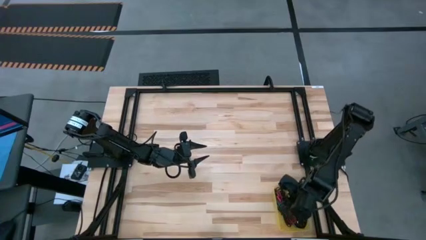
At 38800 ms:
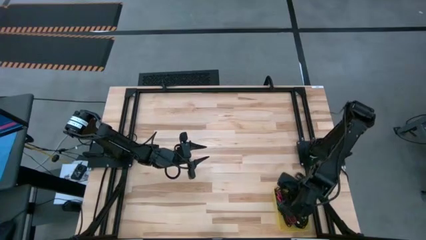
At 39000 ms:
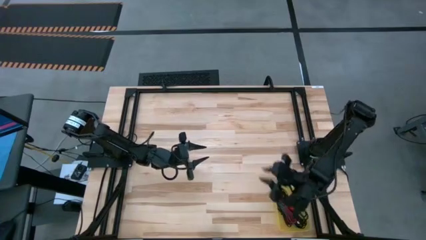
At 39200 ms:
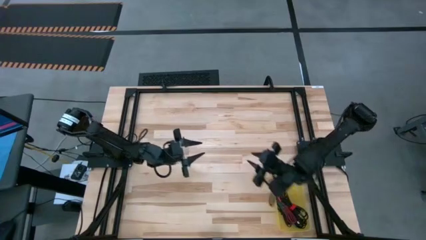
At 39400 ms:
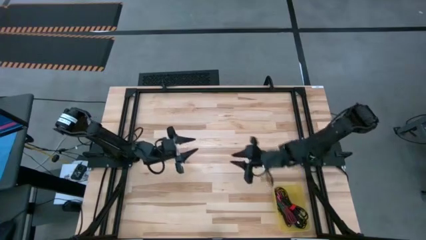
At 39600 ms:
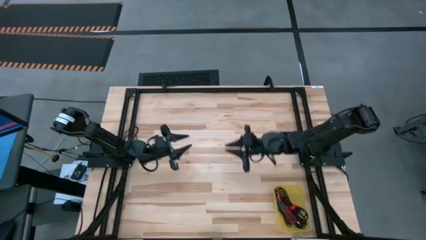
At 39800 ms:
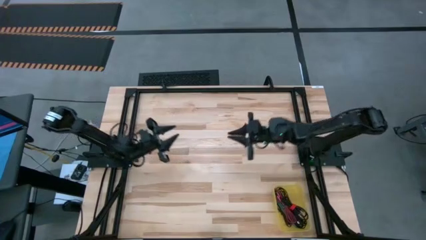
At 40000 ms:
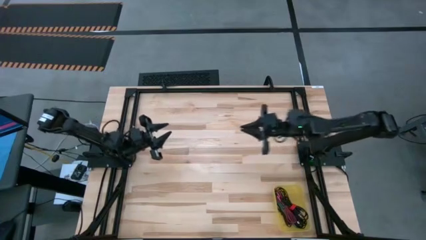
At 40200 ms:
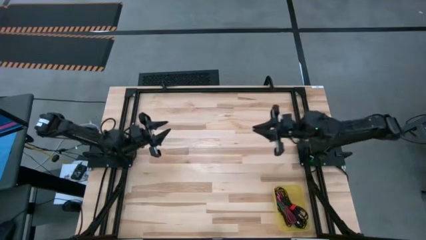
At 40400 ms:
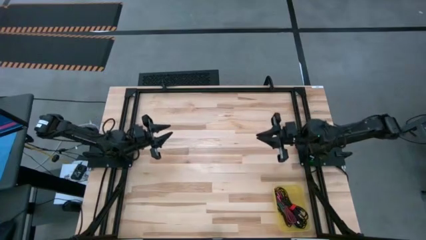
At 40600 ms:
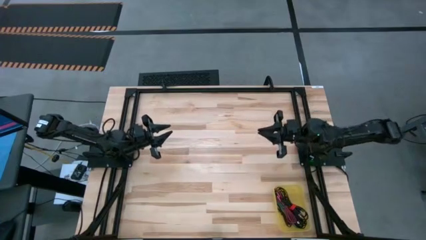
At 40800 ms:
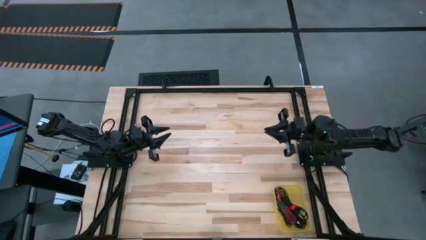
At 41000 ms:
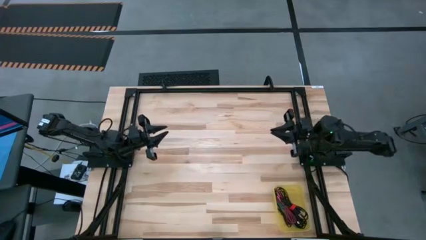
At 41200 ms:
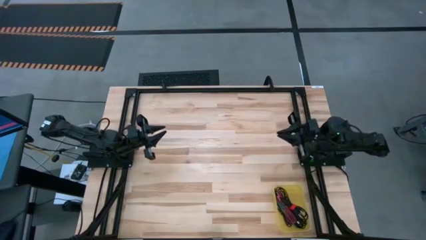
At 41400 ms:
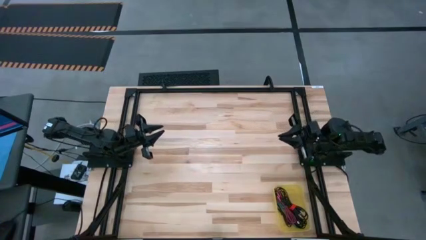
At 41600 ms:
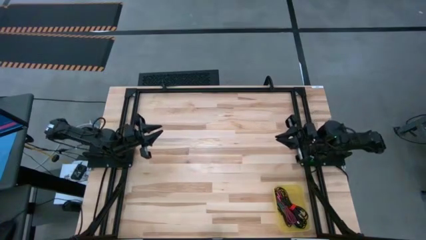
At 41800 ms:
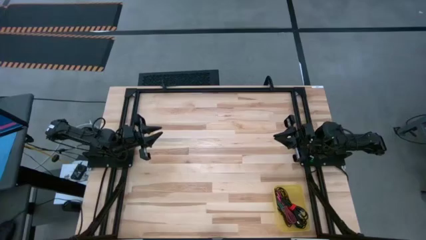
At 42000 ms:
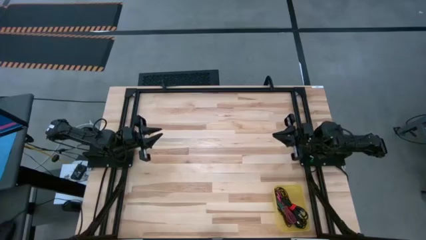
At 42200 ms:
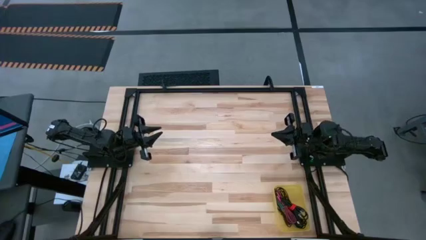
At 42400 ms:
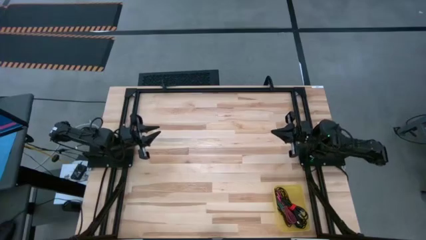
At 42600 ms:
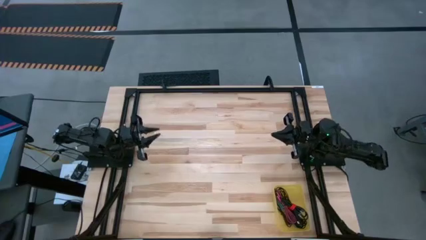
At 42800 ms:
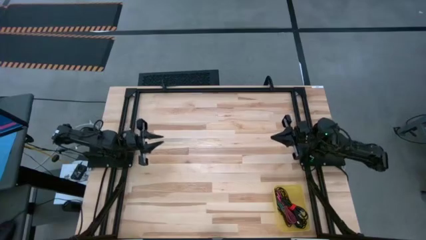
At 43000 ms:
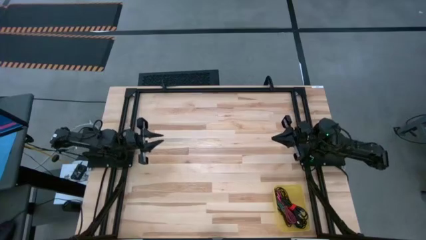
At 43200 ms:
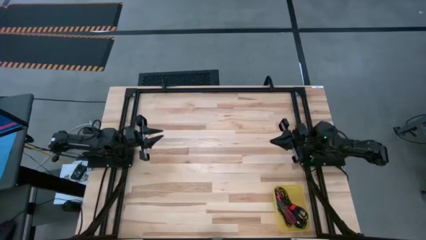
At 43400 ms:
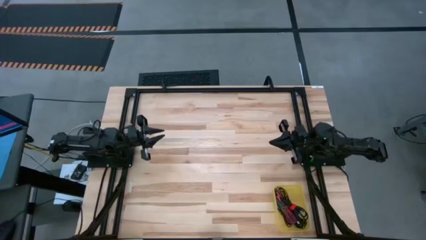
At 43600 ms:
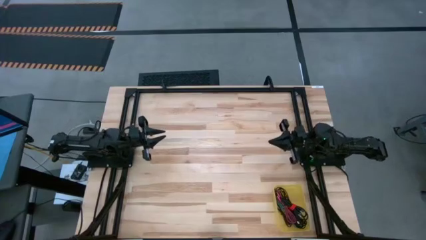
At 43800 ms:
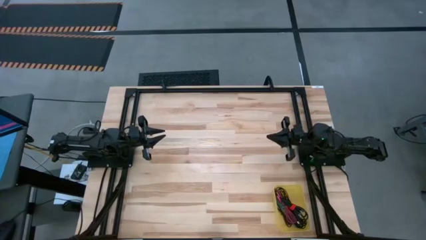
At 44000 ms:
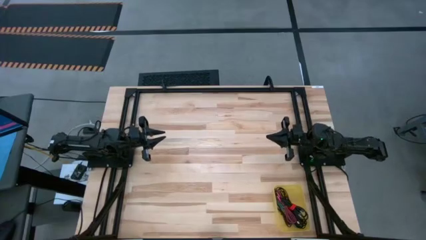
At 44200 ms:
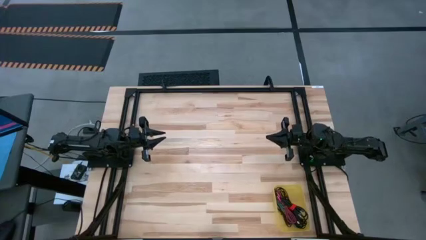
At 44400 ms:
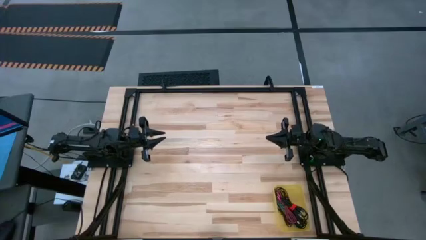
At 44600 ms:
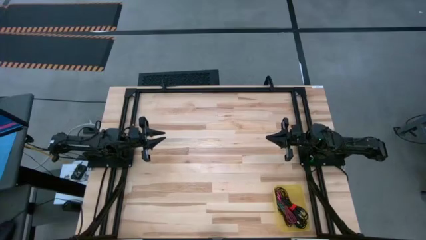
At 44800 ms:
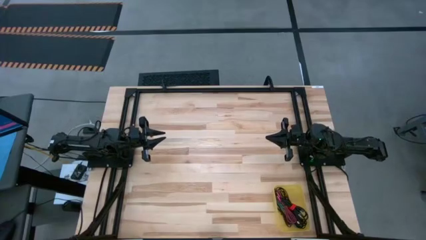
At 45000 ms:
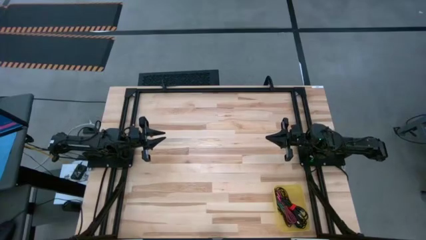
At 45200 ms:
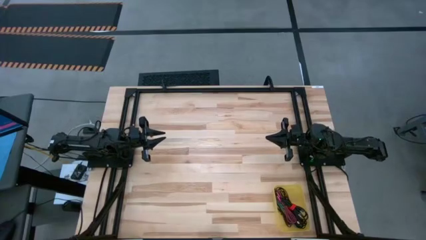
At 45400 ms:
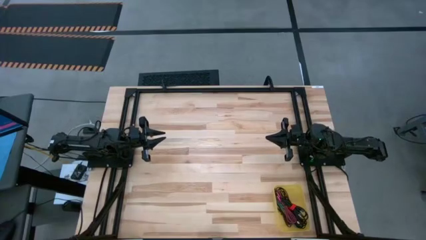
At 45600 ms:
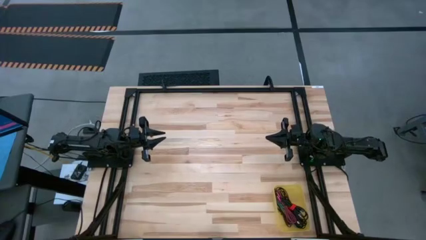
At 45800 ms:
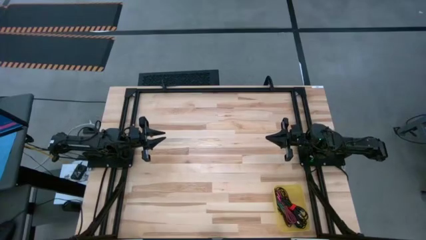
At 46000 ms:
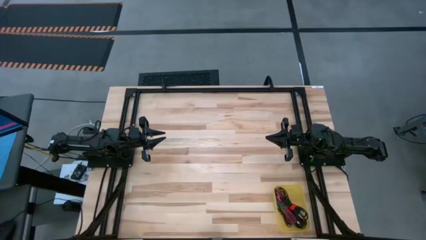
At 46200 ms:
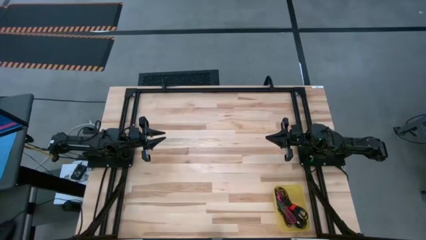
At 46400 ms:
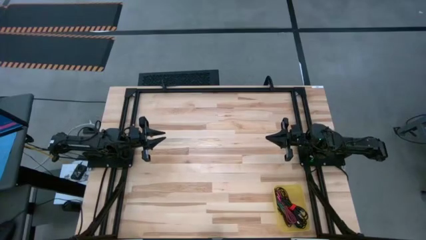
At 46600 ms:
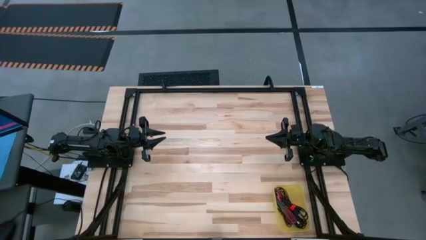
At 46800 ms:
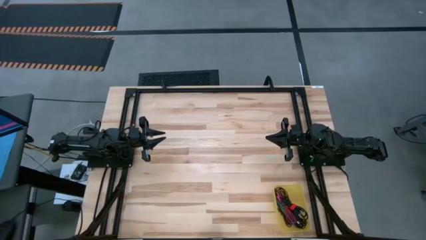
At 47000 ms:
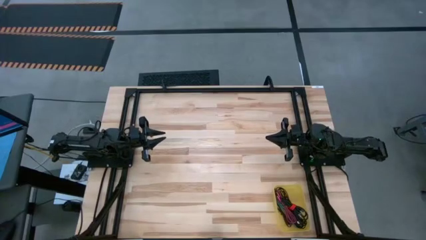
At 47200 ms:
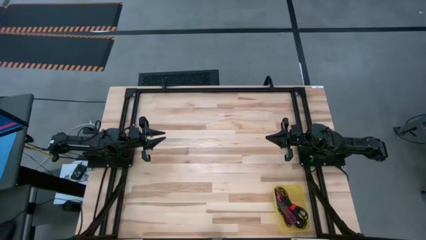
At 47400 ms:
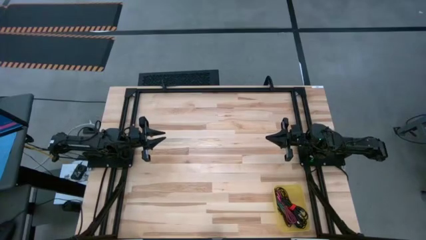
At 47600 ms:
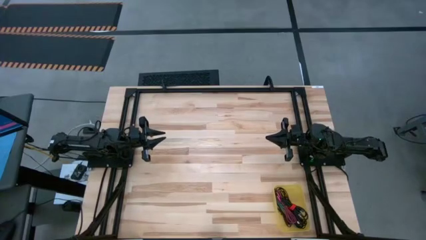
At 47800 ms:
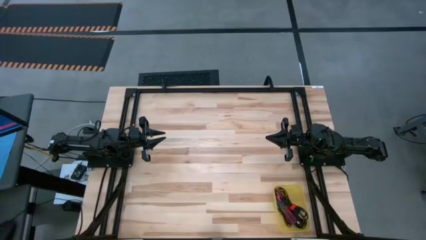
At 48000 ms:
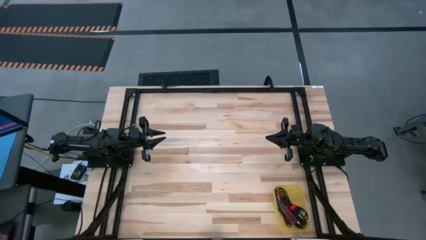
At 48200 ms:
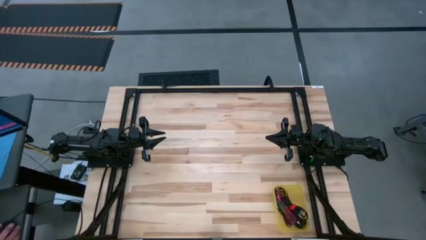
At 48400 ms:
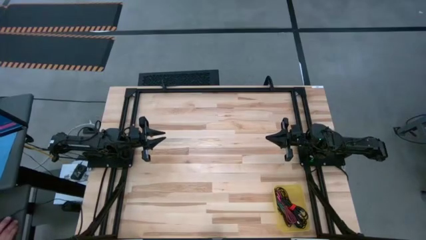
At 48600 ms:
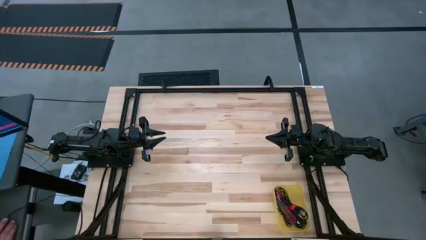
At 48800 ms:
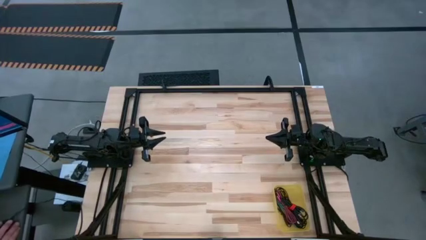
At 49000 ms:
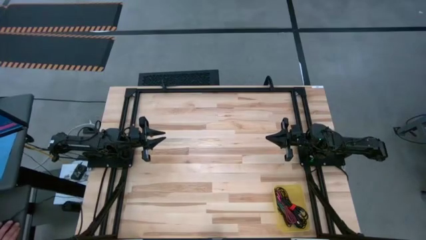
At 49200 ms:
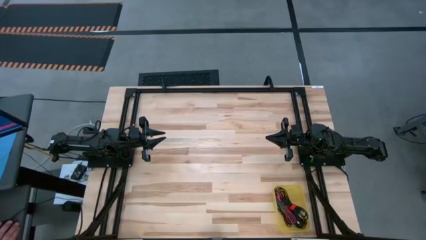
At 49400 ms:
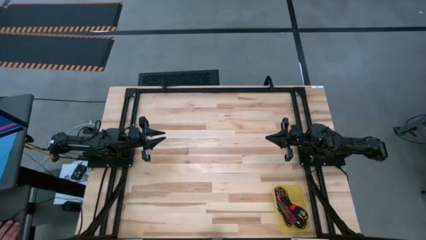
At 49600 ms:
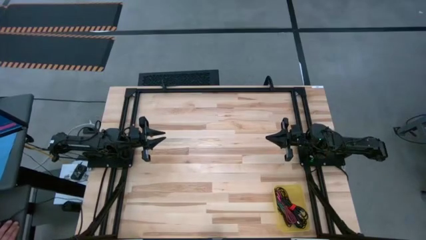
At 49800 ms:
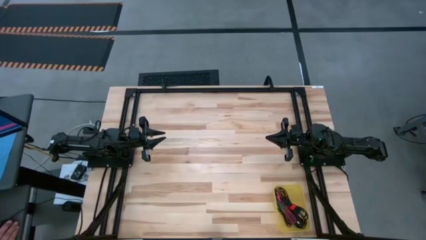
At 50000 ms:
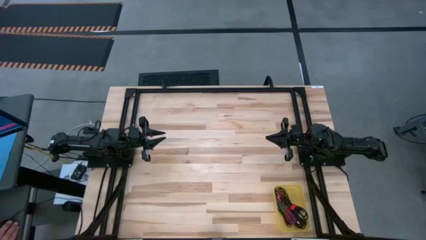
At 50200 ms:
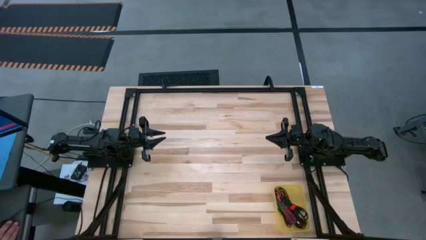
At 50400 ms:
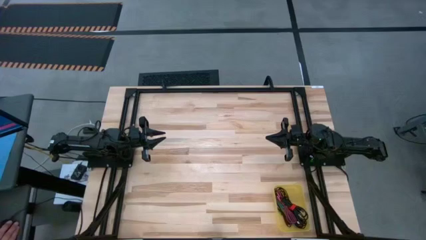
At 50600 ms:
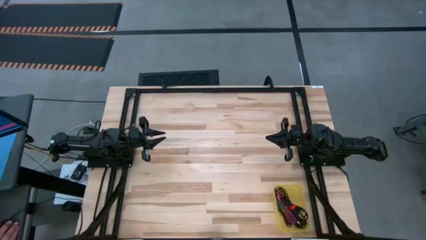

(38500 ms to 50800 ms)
Task: Pick and place USB-C Cables
Return to Home Position

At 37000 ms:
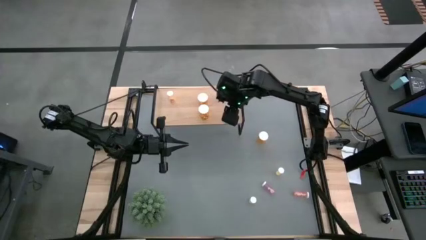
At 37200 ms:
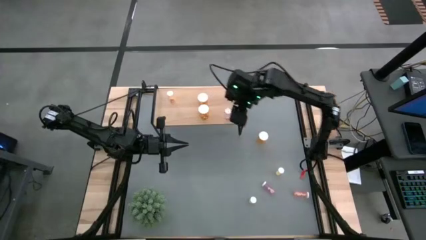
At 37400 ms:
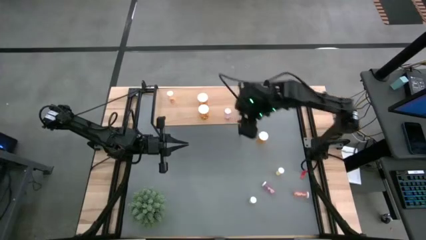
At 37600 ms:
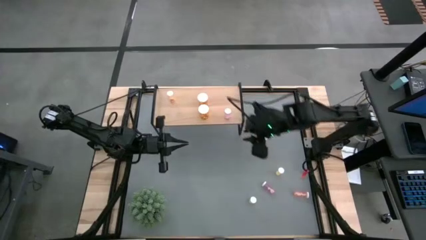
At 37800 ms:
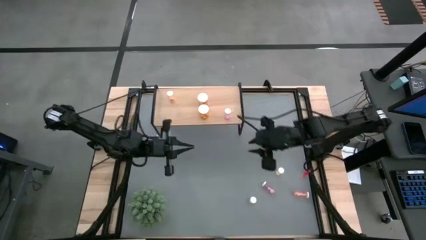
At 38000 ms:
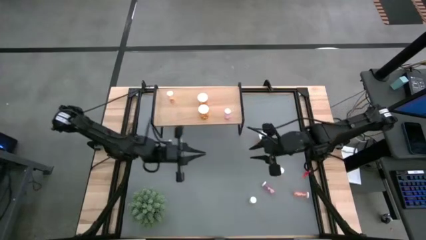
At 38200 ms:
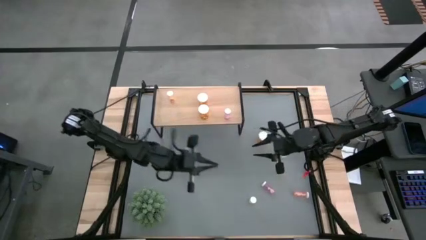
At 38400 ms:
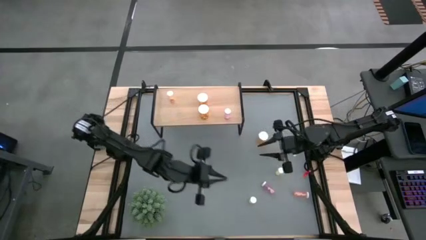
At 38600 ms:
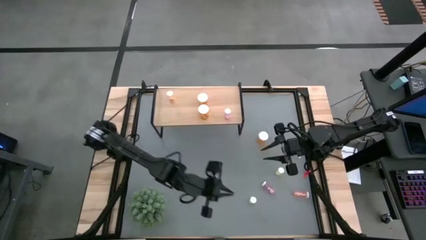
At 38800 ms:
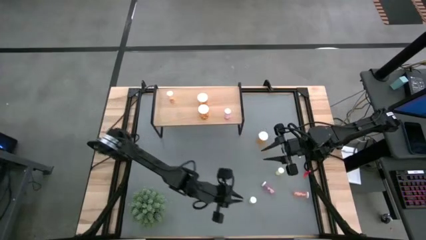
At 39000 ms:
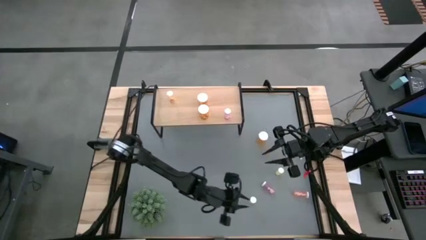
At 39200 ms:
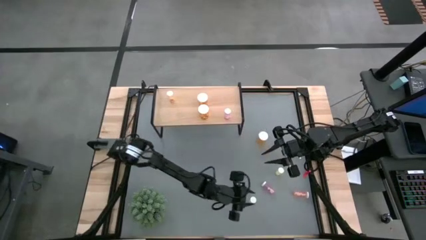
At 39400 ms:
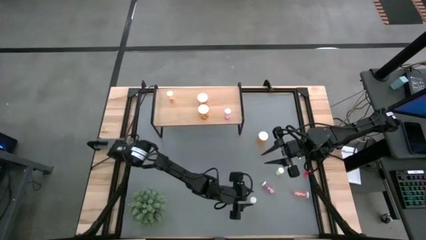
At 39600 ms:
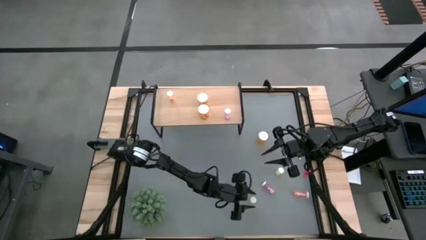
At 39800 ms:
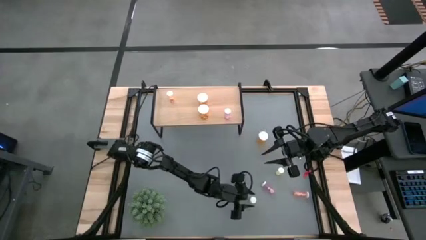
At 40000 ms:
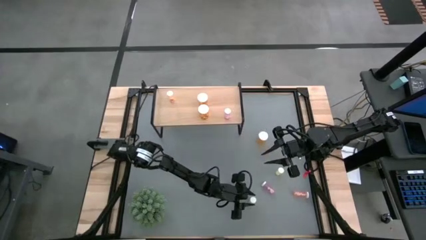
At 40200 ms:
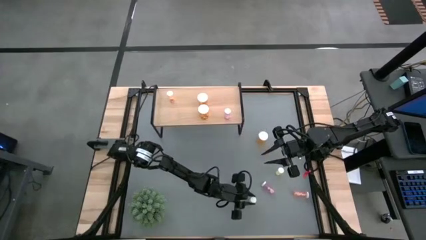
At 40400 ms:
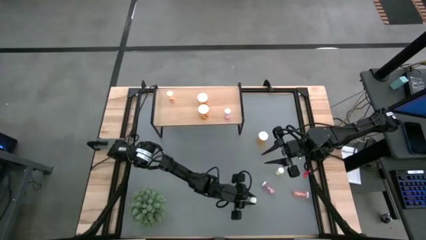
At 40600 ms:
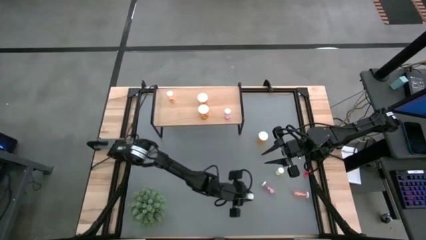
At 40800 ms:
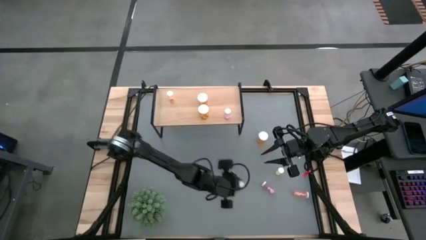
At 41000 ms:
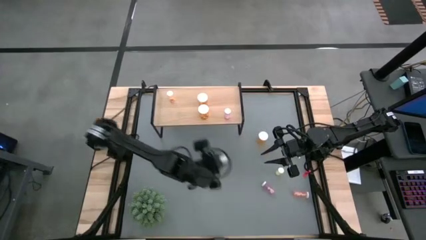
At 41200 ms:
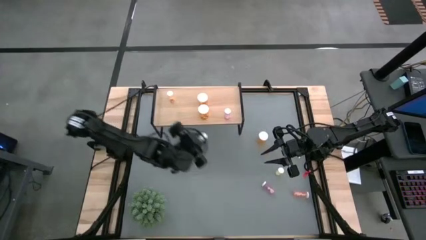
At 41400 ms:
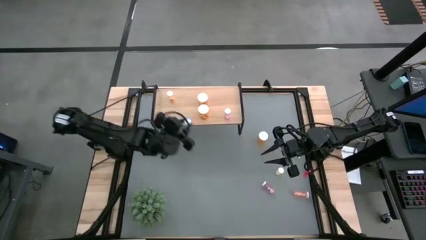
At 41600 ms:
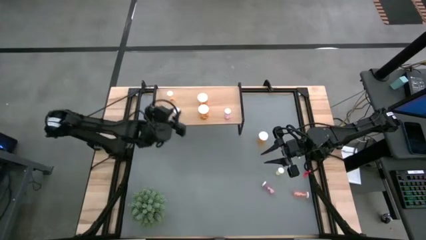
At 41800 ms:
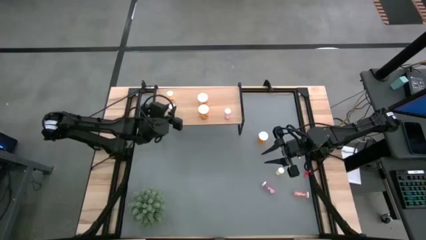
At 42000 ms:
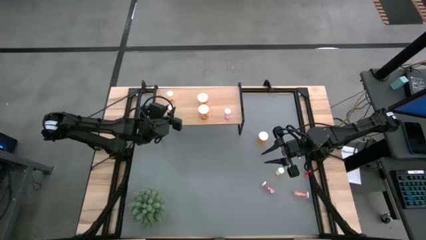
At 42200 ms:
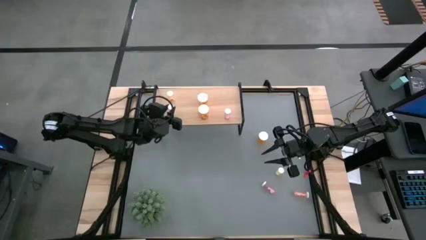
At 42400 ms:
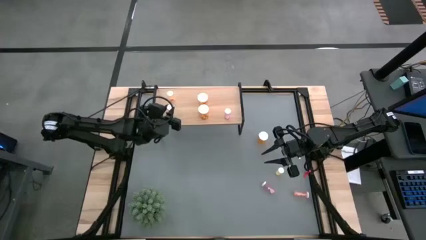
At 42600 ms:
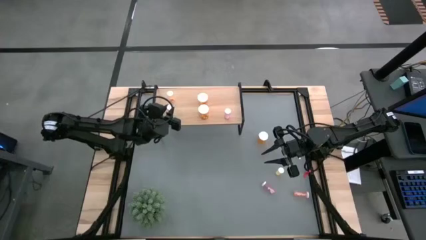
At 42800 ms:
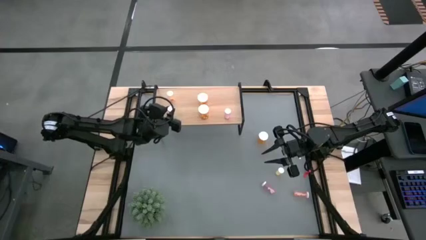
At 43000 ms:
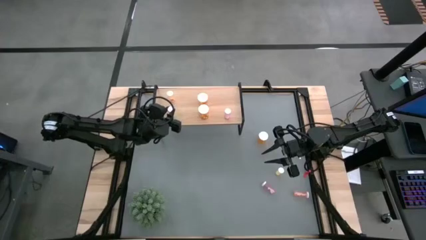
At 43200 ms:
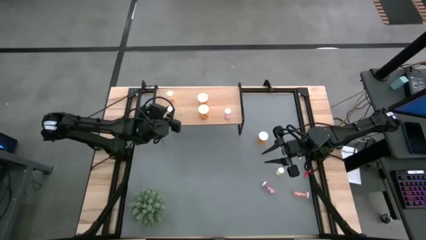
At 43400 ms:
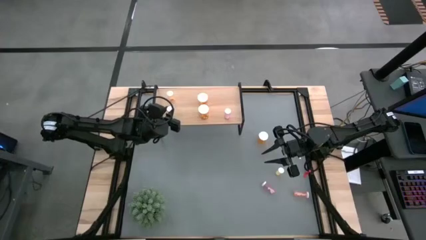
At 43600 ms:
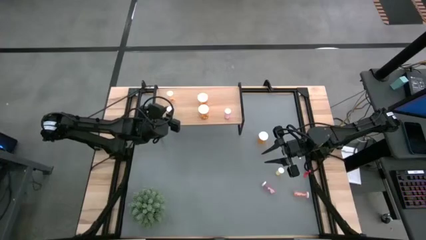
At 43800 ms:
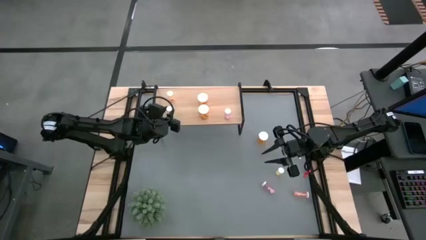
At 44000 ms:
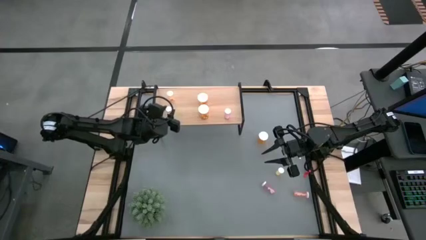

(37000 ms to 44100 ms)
Task: Pick and place medicine bottles onto shelf by color
Put the bottom yellow pill bottle on the shelf aligned with the yellow pill bottle
